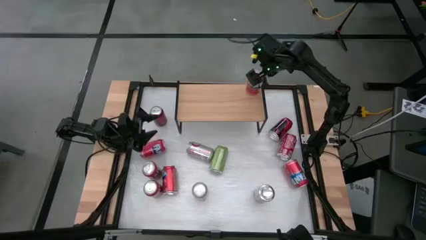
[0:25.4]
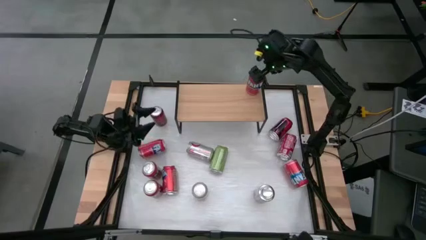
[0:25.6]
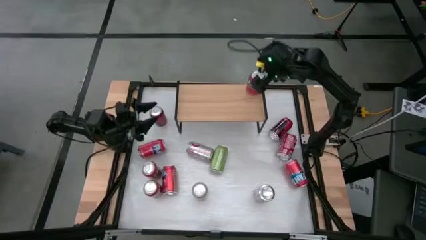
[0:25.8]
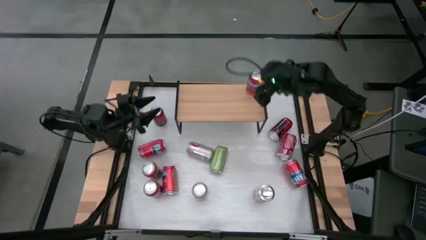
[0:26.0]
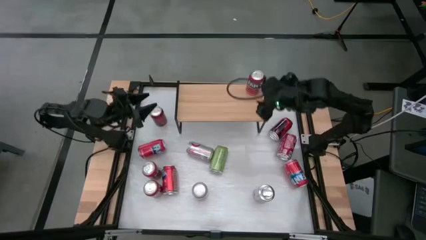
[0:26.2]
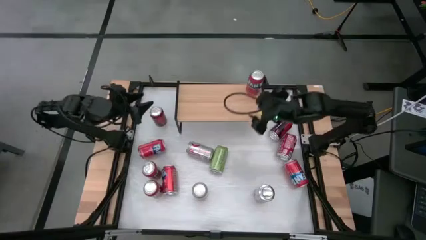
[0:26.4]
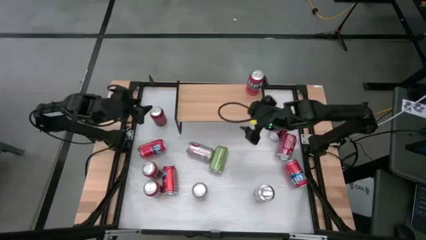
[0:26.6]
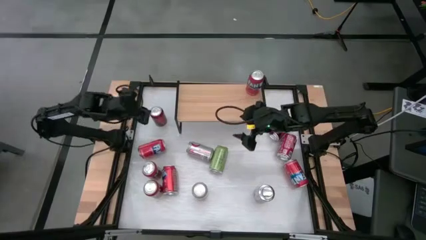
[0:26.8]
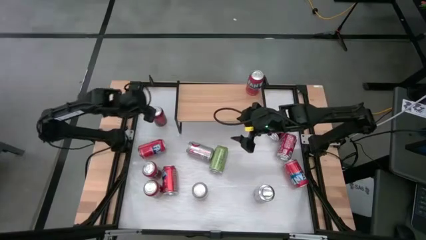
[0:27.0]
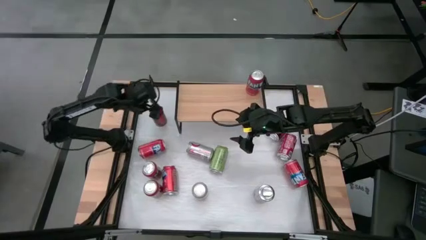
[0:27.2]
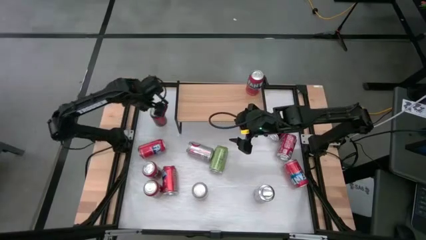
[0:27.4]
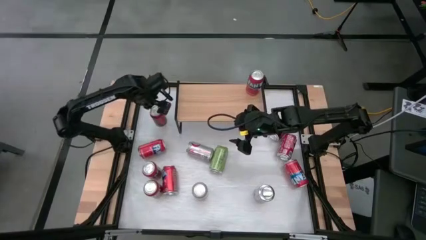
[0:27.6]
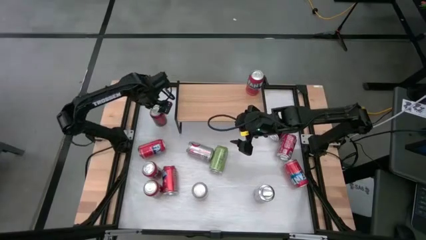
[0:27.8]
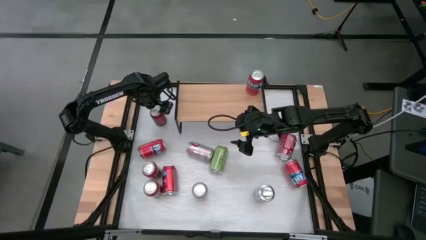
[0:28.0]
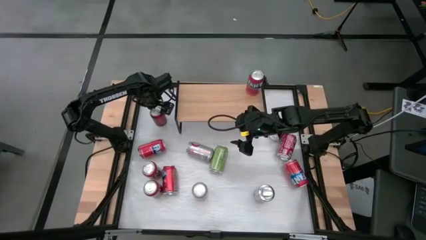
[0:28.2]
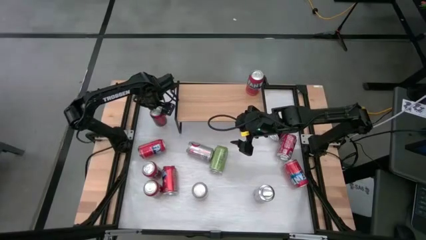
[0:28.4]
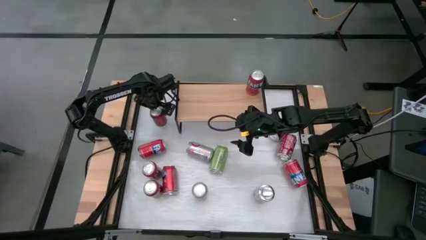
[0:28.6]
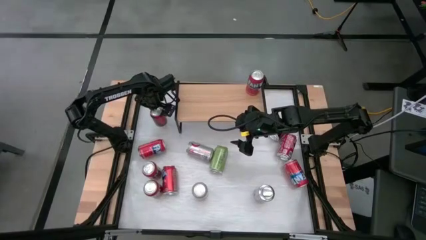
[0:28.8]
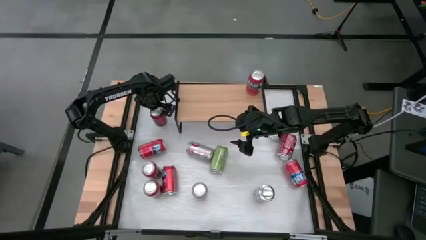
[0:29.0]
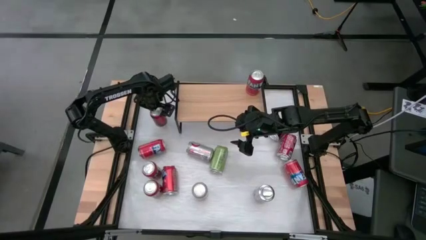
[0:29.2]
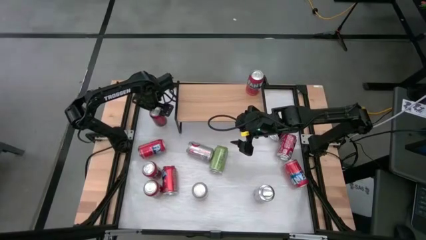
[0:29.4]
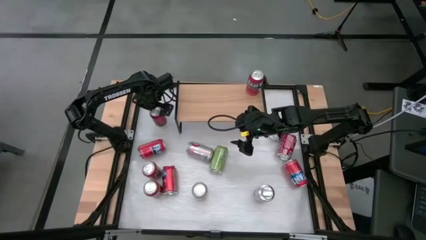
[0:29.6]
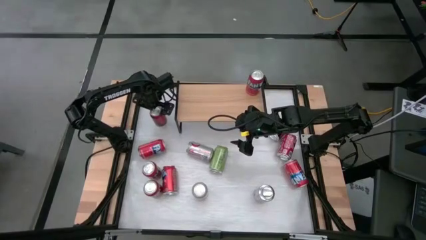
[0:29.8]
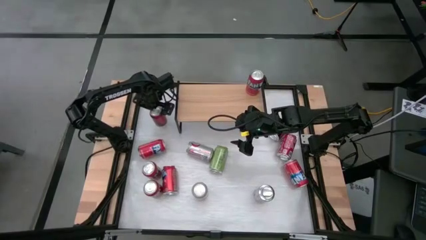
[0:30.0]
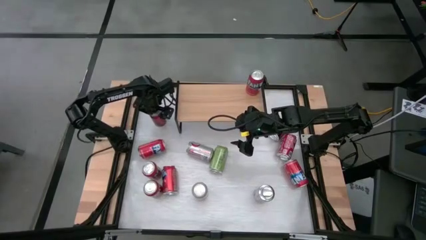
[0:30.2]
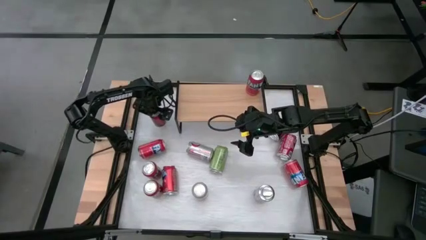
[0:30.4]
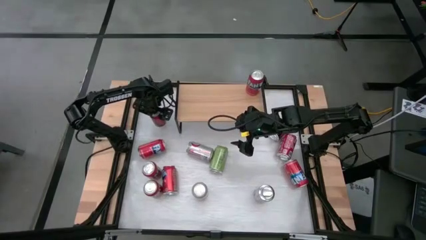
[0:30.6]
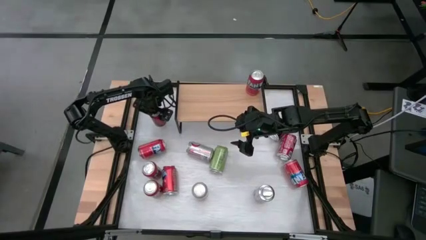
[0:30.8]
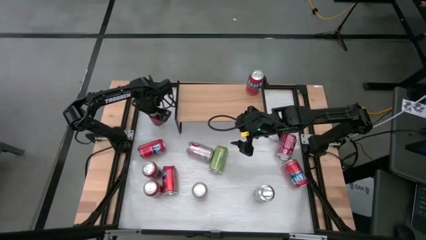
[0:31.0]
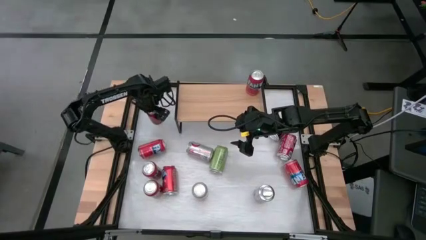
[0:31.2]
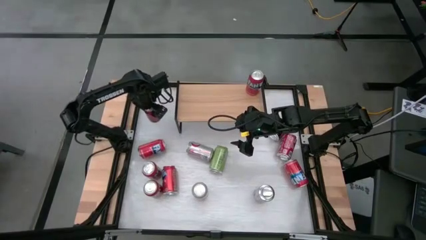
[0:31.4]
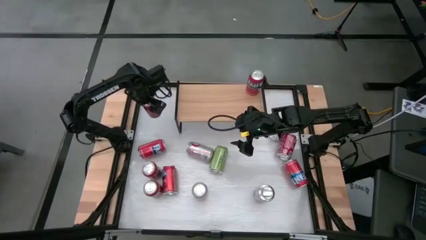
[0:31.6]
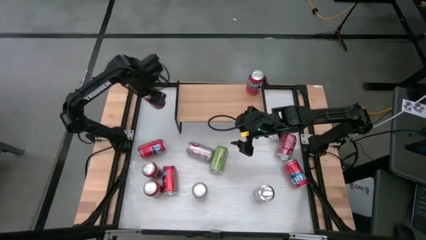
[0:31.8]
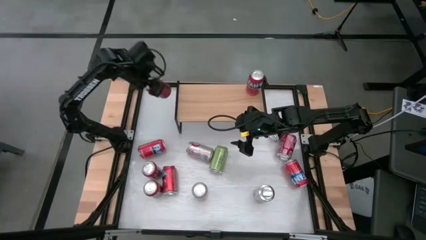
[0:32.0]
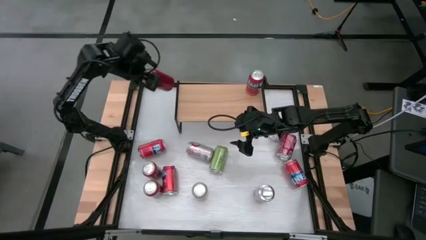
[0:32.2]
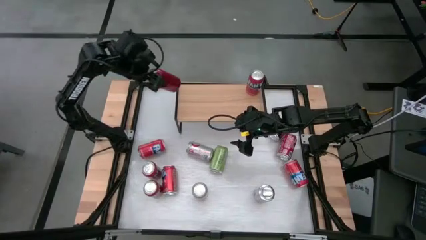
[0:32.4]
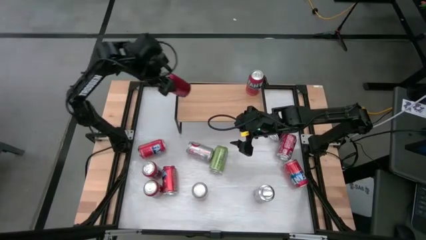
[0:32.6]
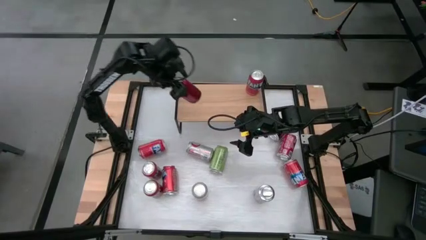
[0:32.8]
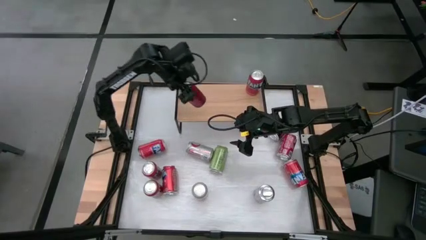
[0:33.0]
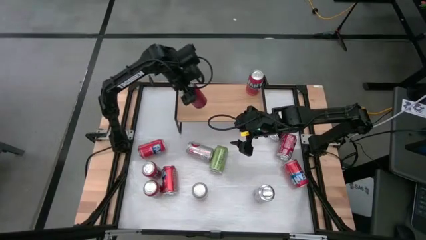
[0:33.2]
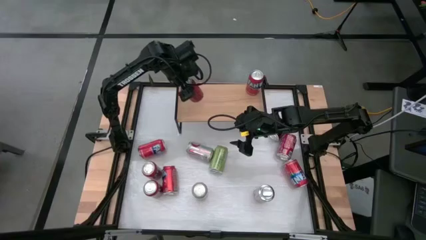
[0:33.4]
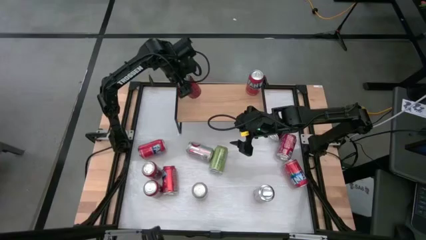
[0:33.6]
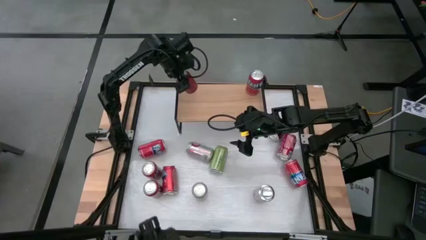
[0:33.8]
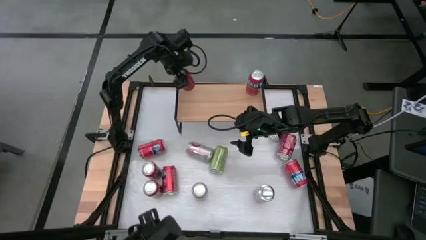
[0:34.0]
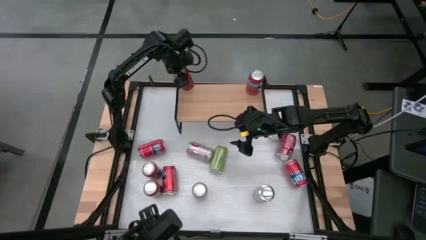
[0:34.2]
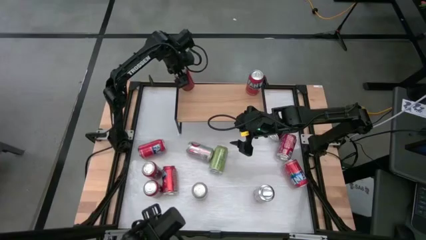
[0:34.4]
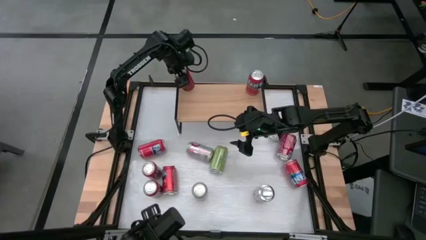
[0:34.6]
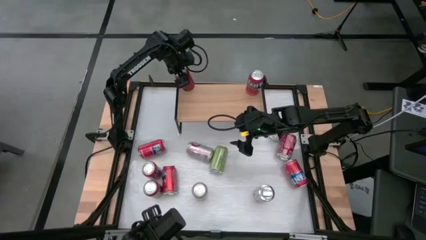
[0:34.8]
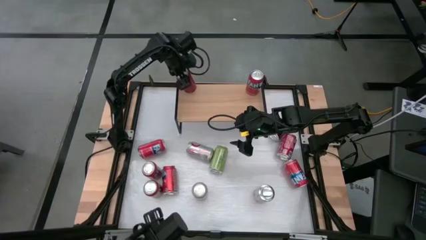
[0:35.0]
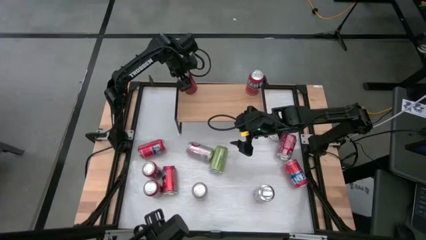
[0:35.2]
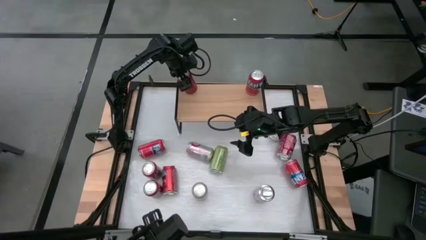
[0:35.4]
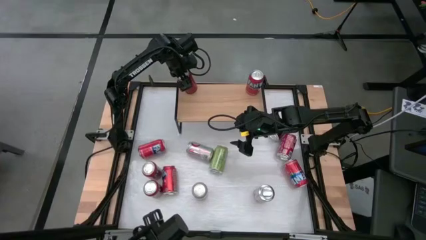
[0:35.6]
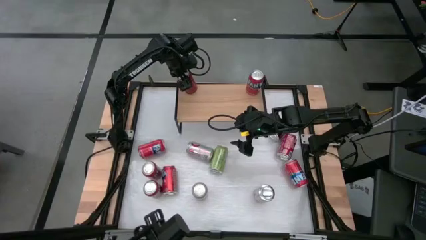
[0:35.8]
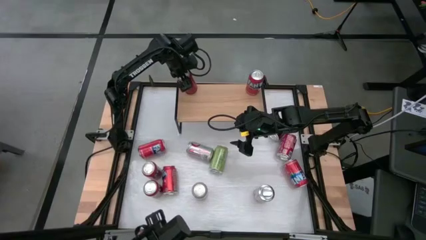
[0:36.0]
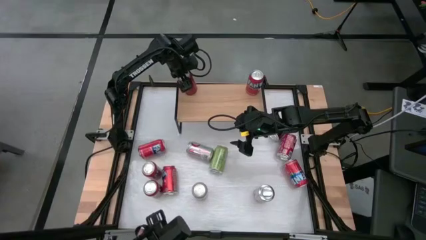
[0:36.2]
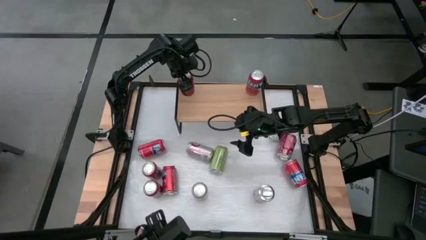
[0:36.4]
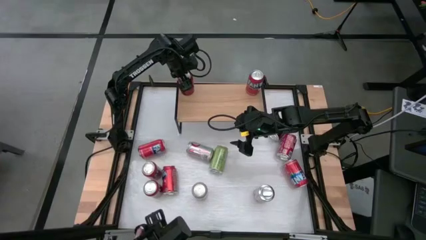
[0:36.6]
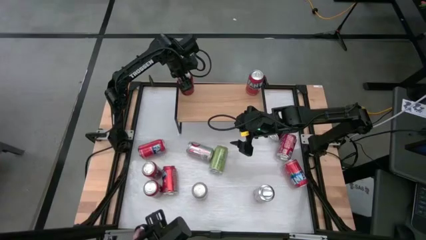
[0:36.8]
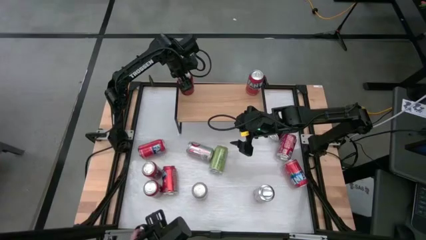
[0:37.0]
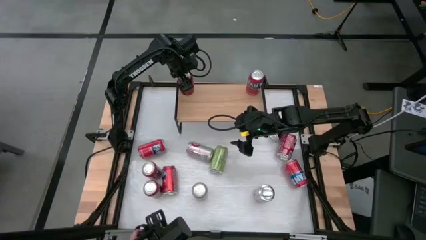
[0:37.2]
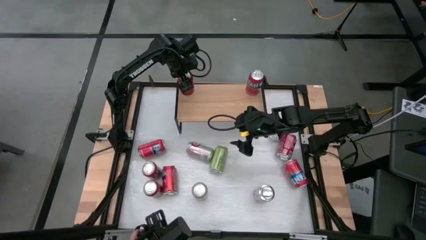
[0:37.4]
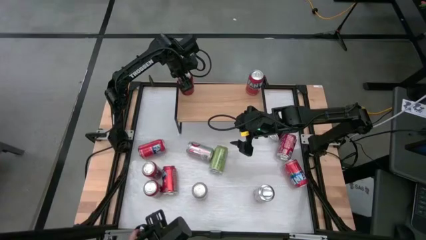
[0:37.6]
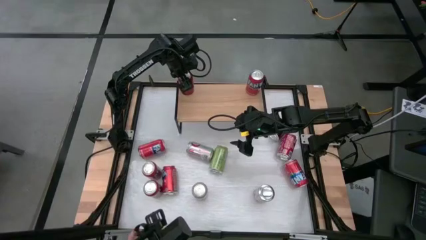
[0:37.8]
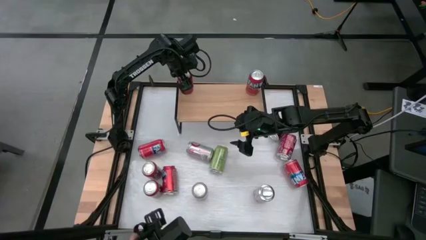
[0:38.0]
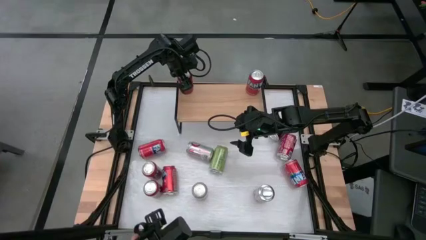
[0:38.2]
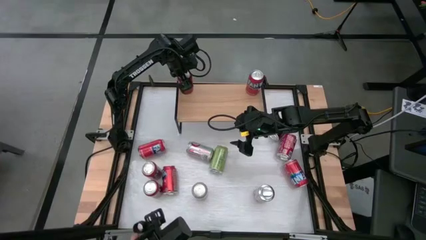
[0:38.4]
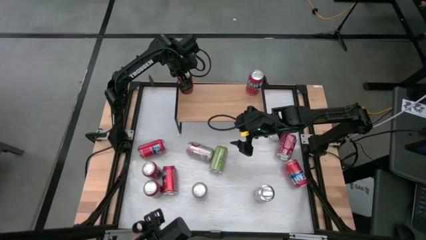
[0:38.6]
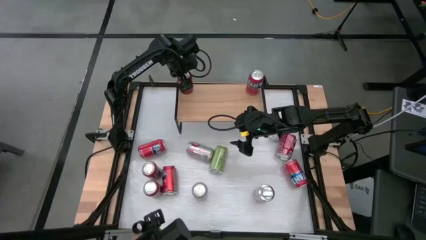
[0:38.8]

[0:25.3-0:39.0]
Task: Place canned beverage on shelf
Put the red black soda can on the shelf
